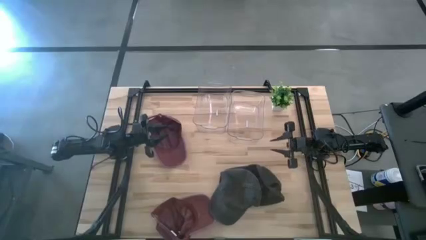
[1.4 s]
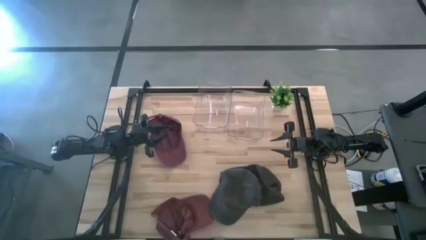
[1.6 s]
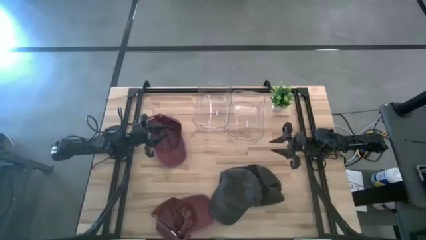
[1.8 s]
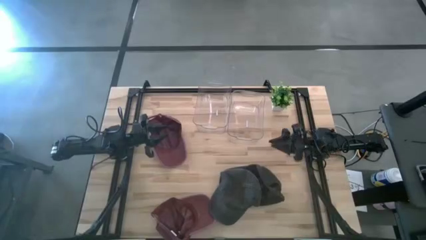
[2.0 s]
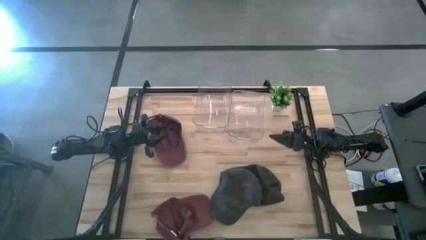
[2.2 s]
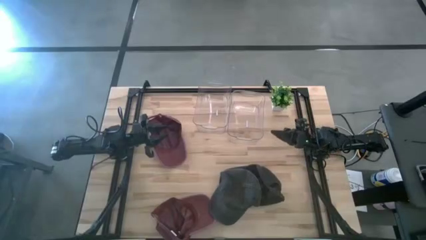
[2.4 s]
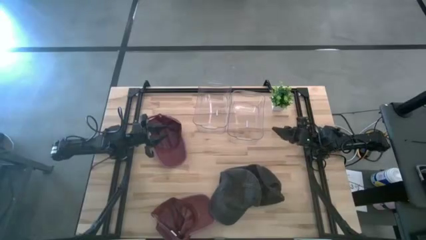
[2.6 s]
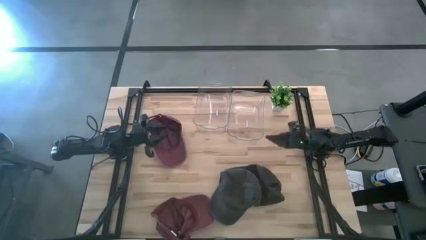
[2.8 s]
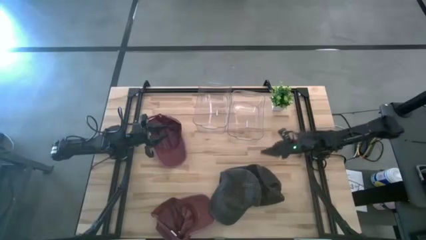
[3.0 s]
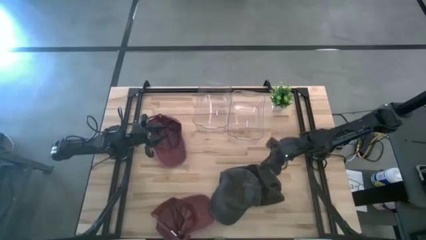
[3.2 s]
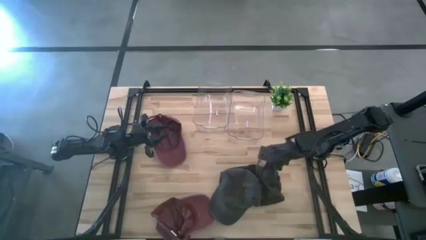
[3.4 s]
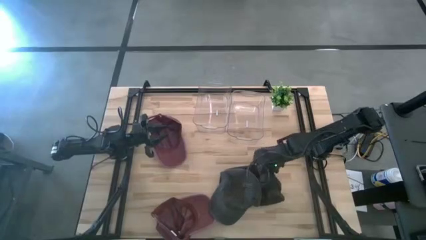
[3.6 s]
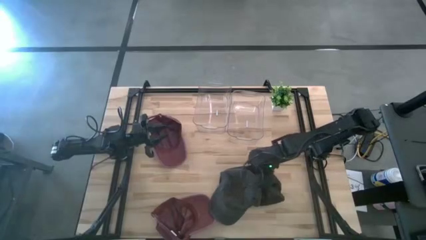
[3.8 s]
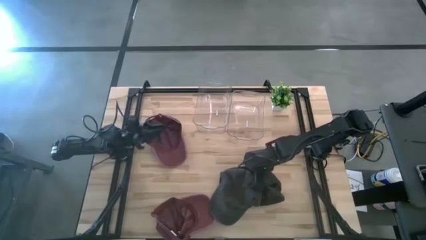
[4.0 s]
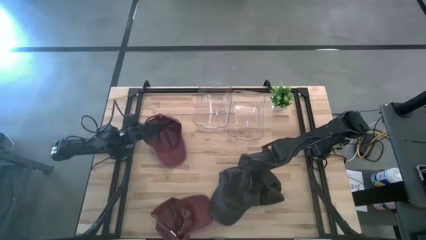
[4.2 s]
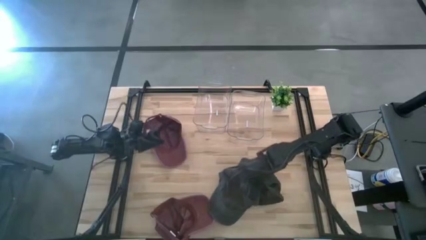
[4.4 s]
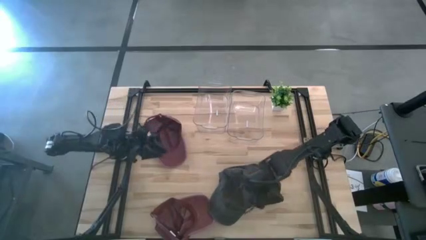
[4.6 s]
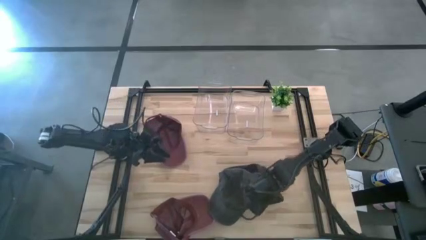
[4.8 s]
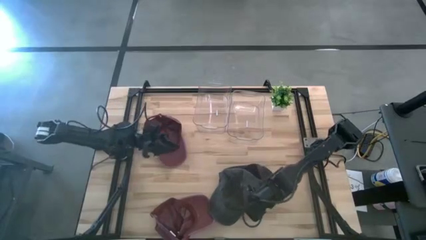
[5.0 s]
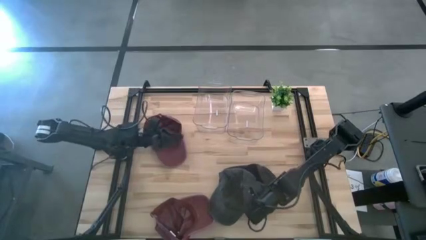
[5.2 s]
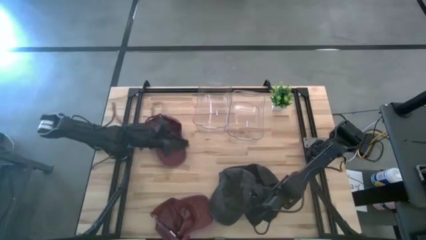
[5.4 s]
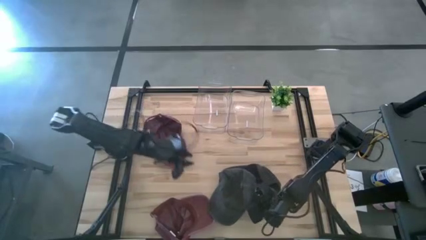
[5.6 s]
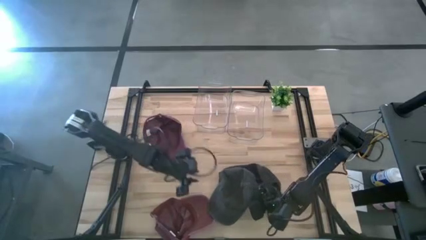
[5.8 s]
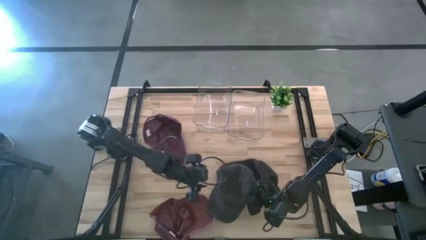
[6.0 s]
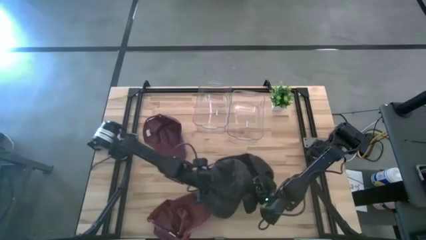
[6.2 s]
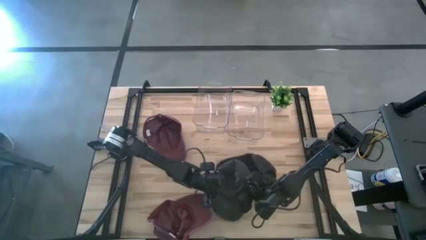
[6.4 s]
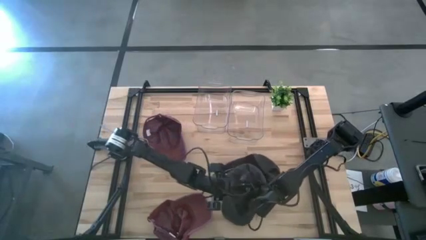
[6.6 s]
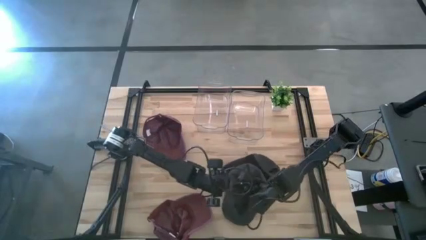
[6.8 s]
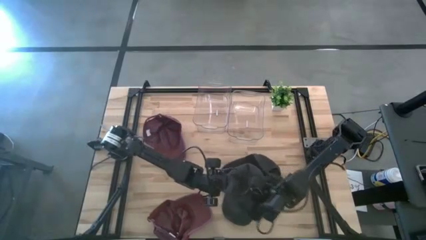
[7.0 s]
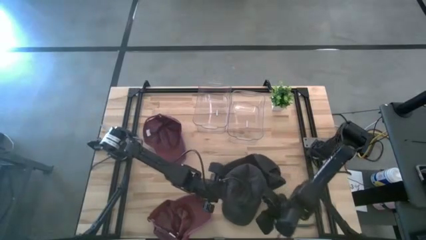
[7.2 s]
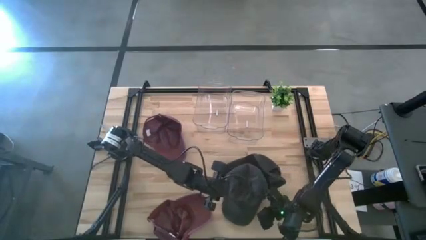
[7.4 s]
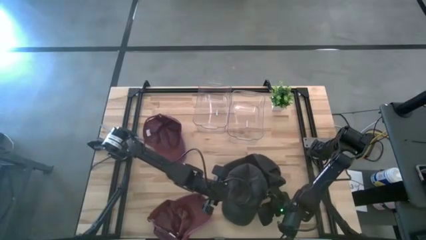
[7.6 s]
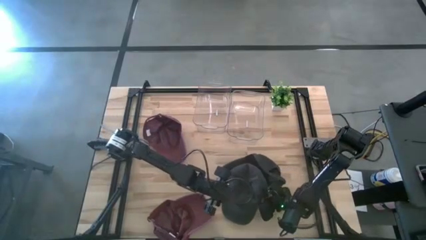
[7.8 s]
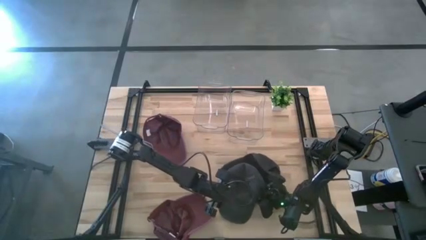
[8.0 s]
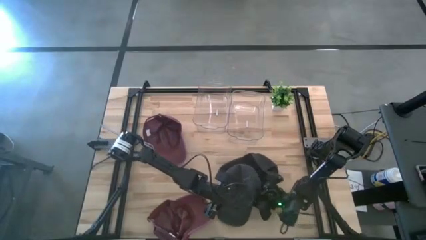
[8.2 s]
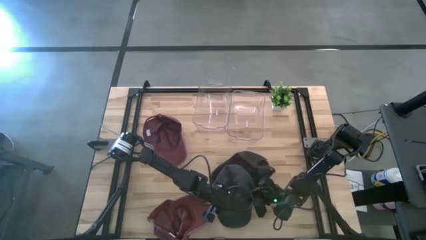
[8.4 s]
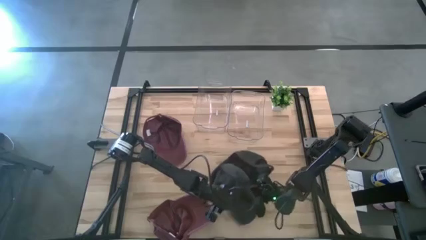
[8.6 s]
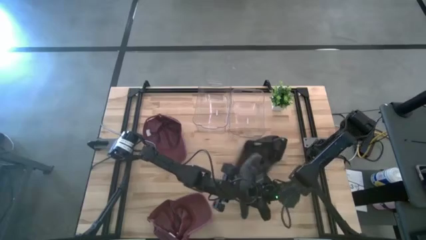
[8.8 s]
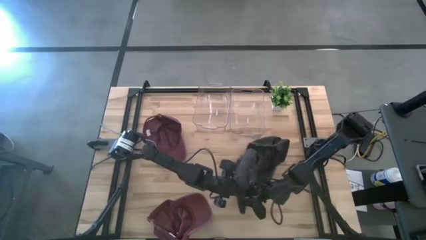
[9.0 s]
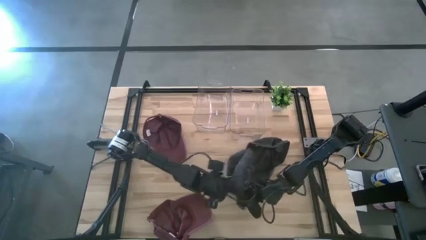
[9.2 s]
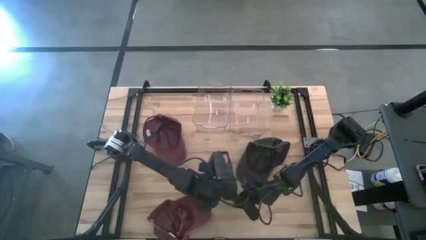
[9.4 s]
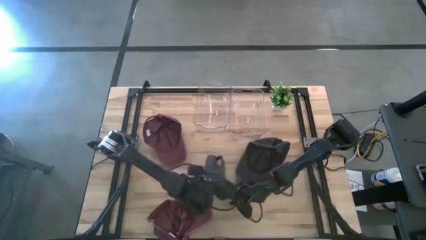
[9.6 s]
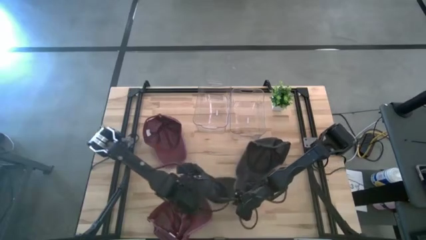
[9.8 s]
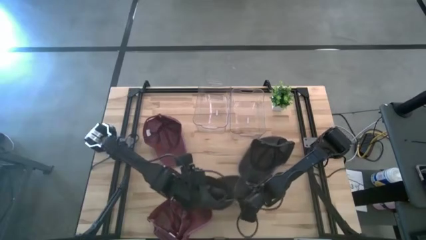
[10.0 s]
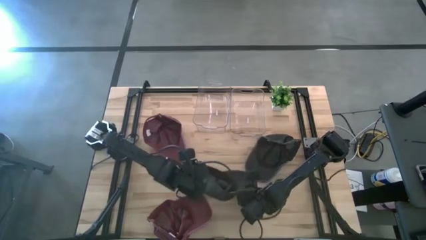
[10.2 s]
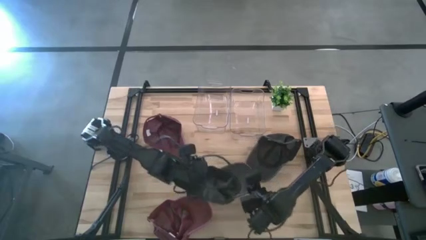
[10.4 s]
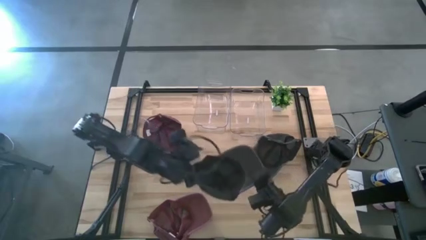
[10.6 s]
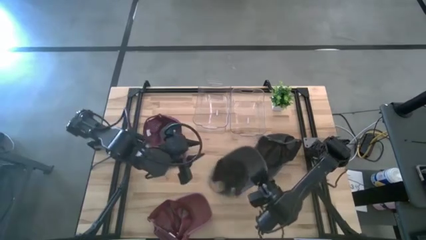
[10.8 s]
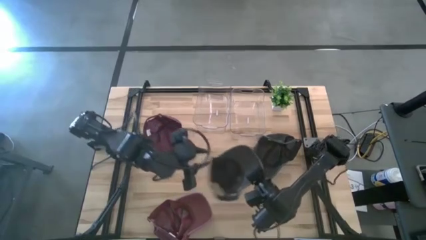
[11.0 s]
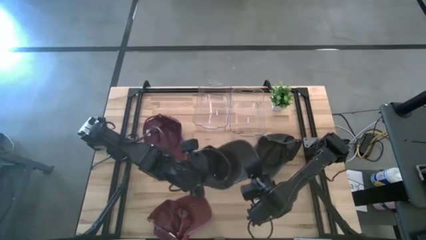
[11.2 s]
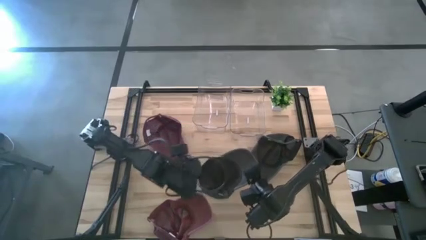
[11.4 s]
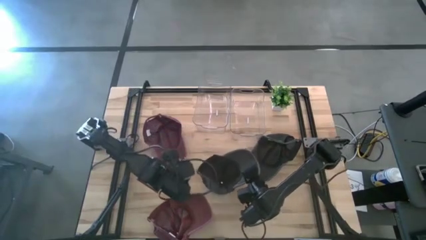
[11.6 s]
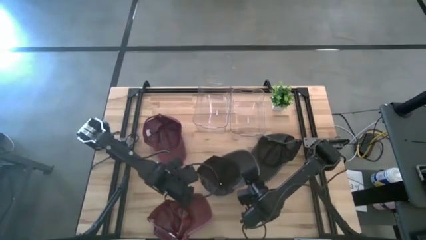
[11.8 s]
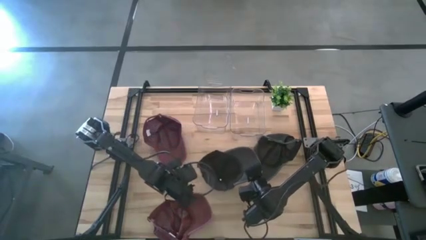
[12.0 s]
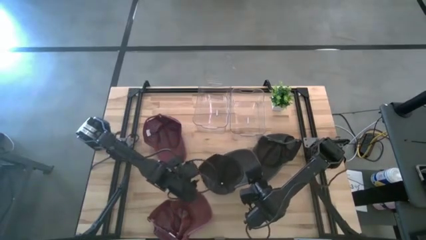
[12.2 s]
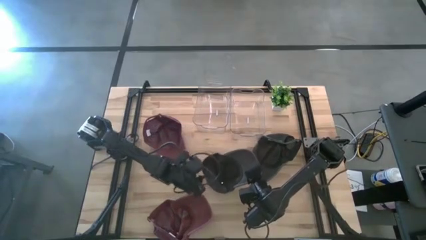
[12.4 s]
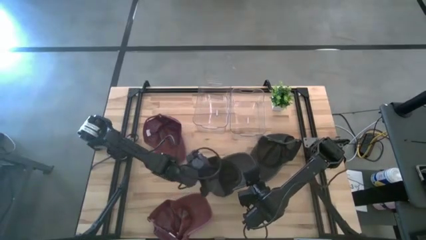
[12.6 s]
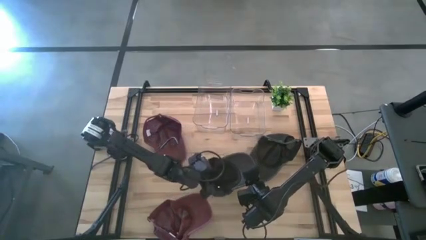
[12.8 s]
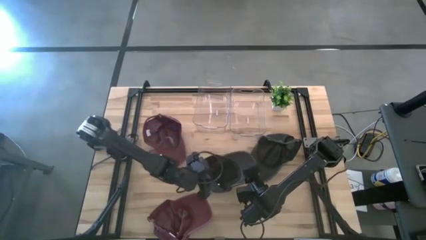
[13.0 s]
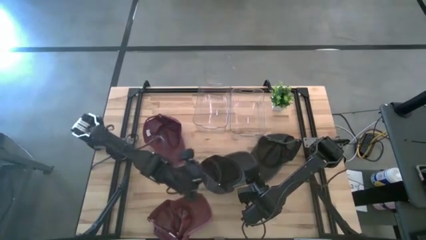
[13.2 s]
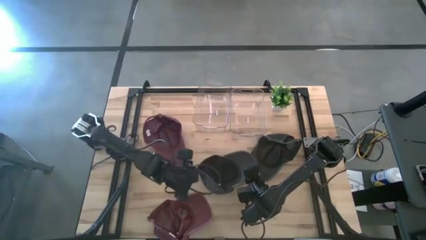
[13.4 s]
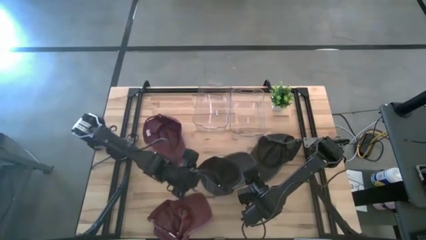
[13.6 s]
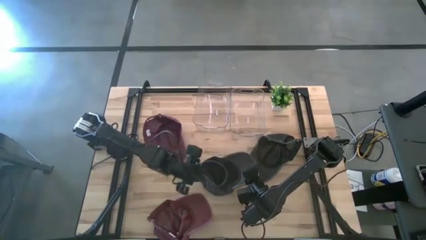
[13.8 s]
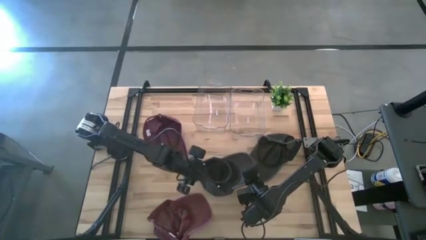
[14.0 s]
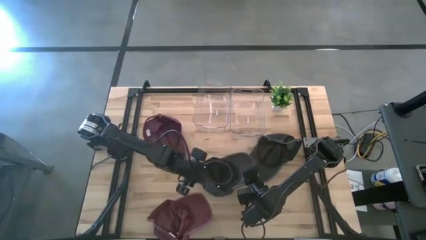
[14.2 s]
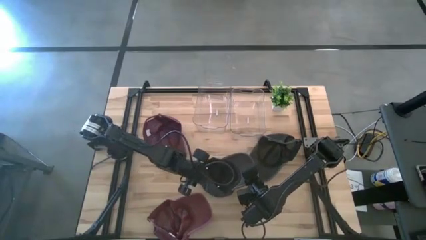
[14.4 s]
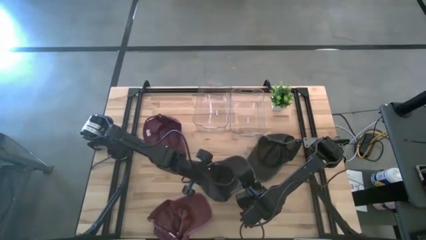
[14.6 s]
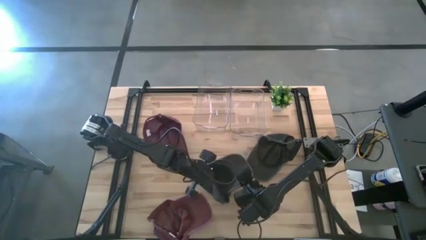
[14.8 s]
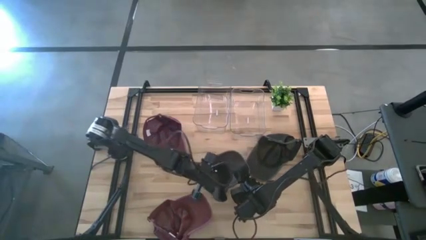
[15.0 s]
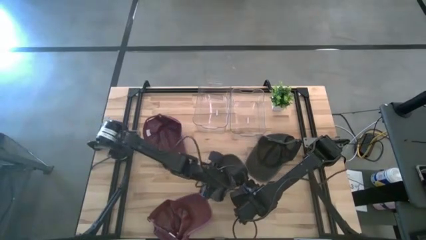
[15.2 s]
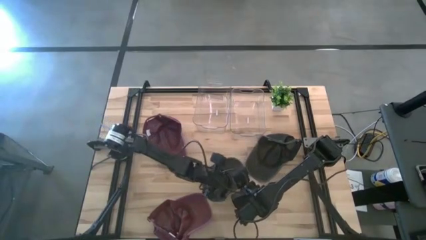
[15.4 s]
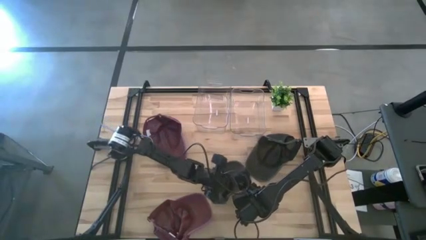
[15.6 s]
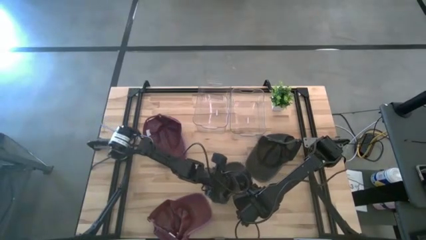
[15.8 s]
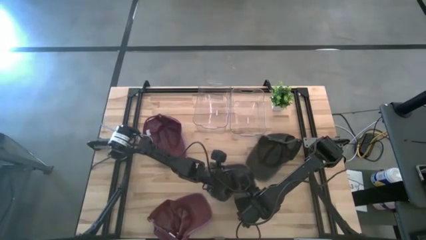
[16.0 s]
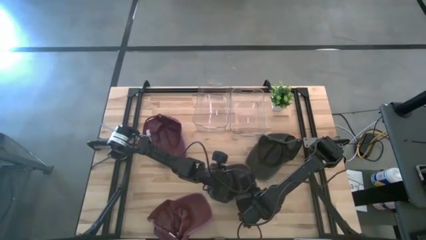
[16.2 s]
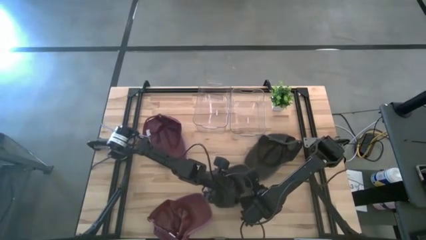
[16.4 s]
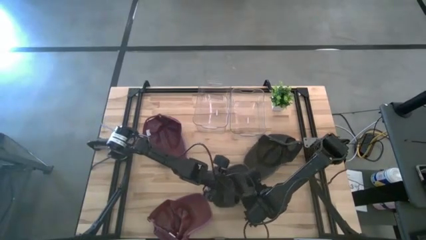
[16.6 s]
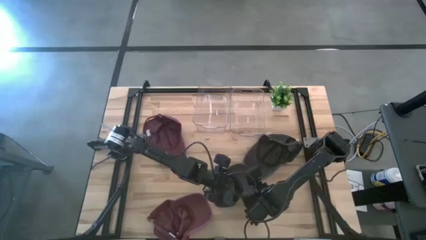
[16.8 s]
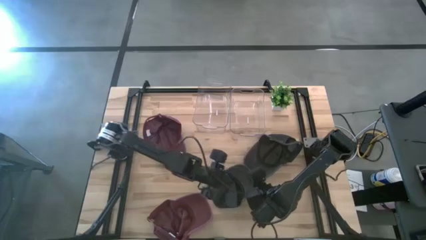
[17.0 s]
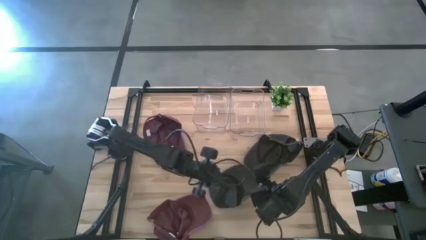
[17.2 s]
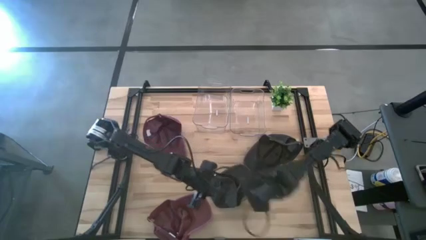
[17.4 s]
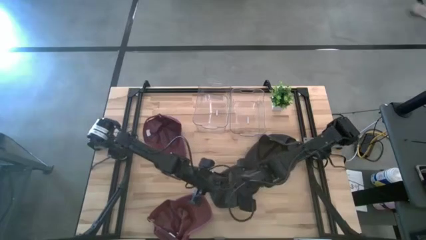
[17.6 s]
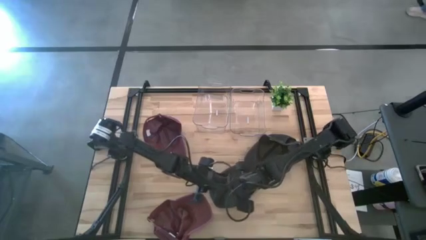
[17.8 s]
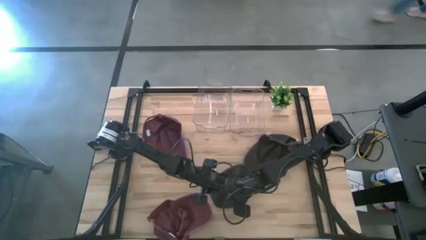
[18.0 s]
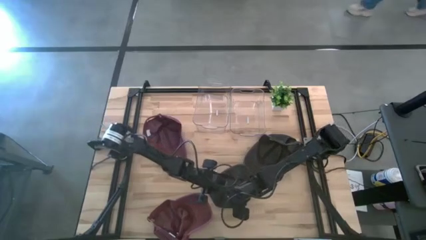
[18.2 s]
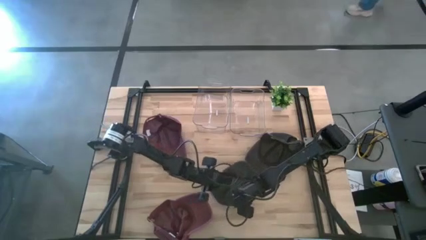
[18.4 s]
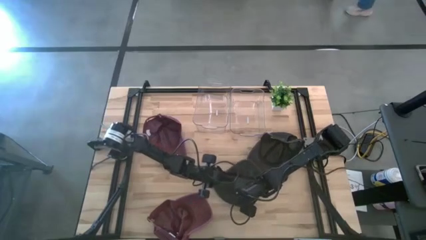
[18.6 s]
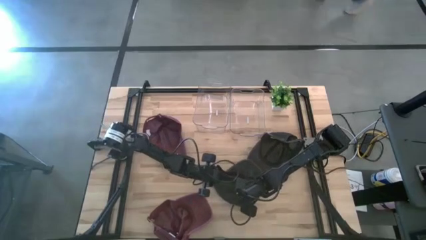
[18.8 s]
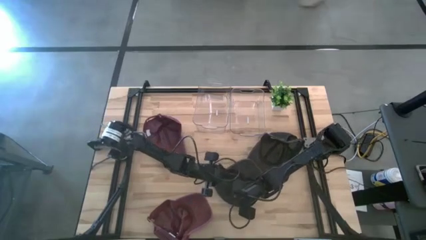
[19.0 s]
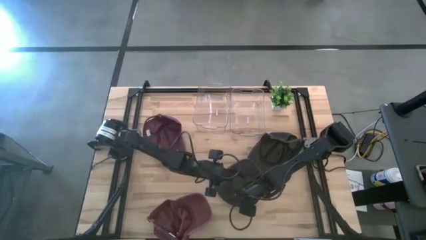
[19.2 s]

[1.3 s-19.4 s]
Task: Pick & Place hat
Put the left black cap into the left transparent bin
